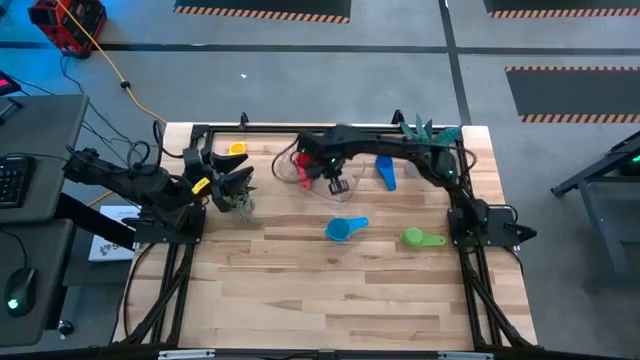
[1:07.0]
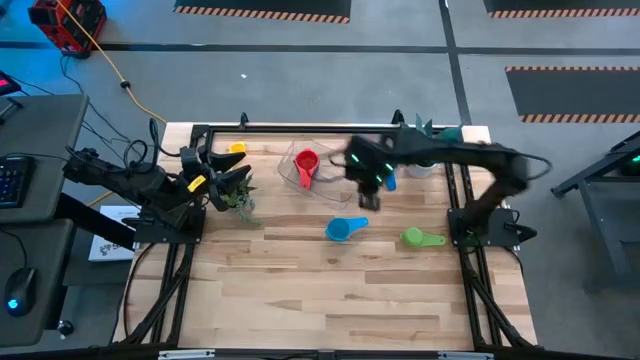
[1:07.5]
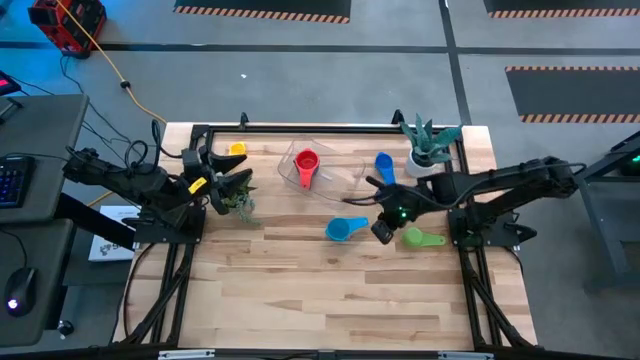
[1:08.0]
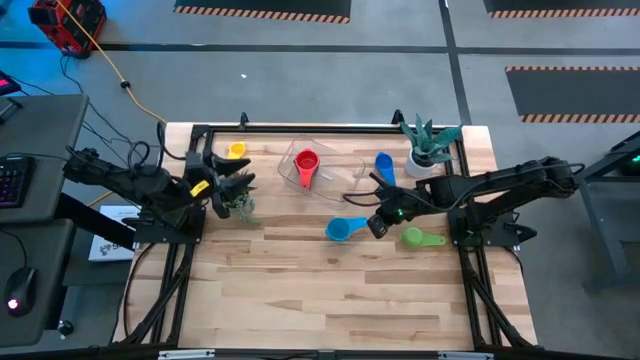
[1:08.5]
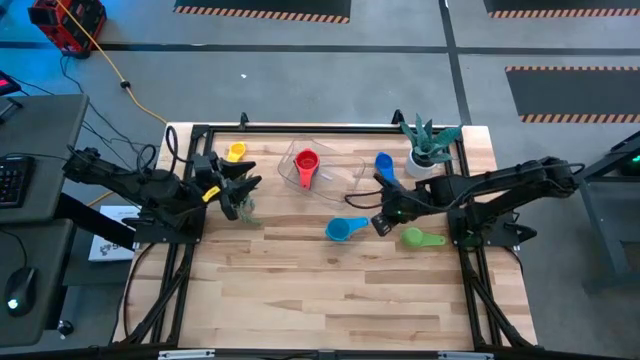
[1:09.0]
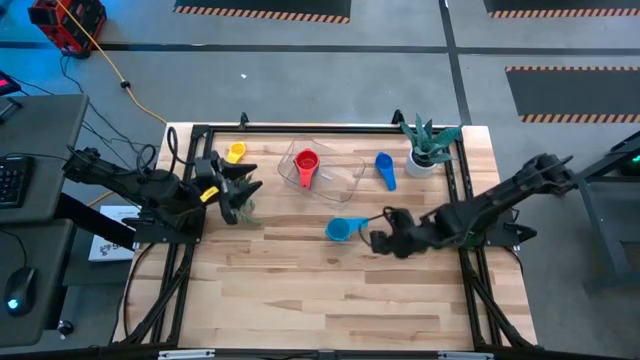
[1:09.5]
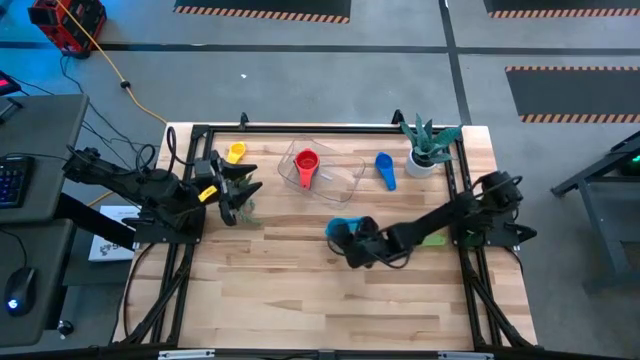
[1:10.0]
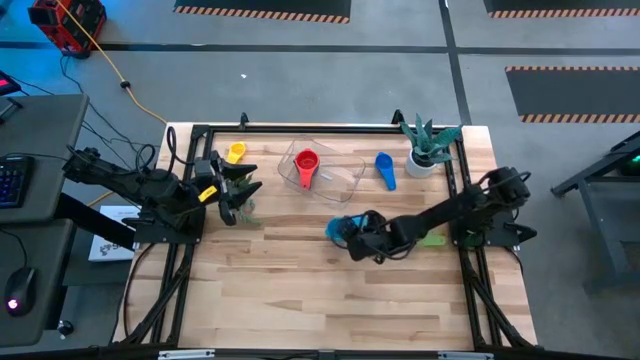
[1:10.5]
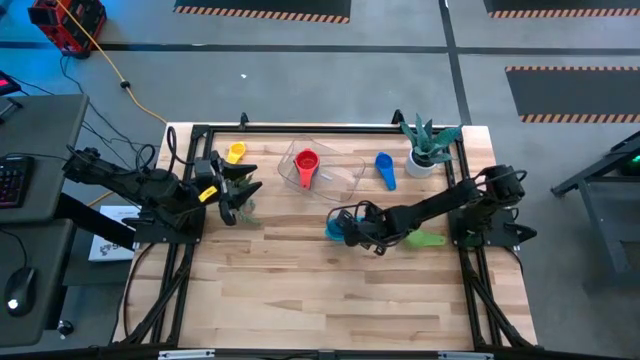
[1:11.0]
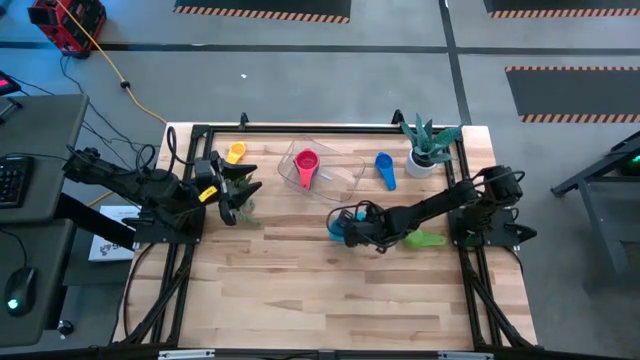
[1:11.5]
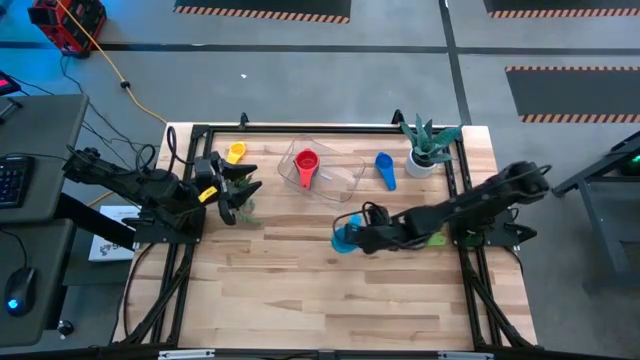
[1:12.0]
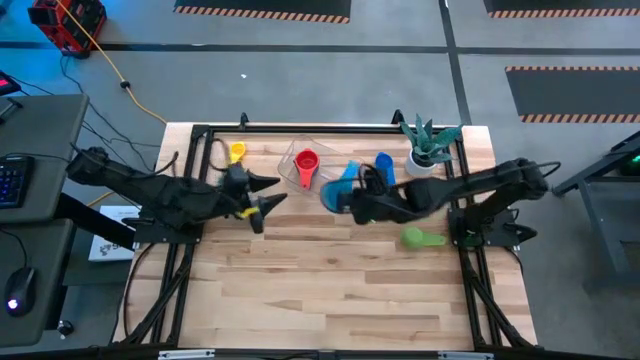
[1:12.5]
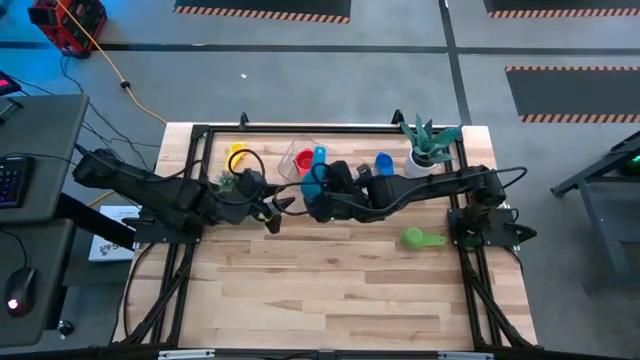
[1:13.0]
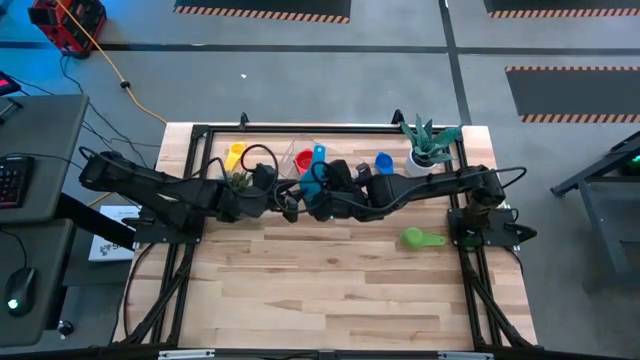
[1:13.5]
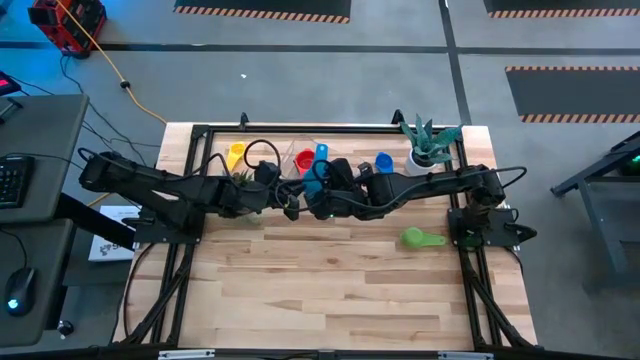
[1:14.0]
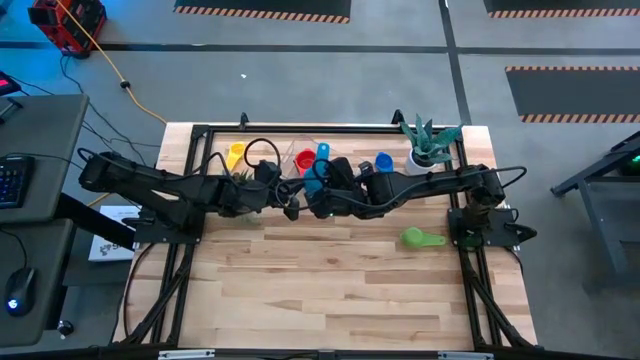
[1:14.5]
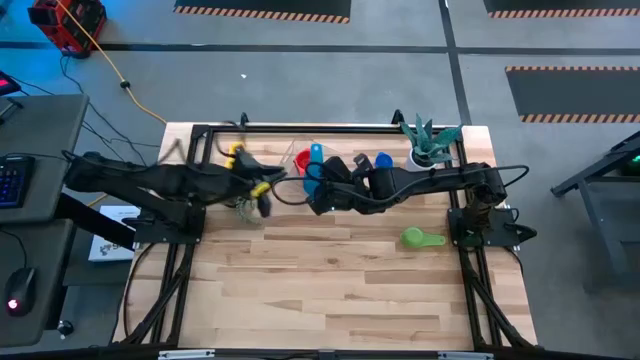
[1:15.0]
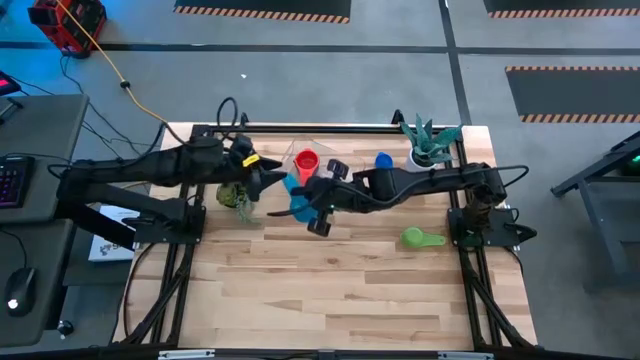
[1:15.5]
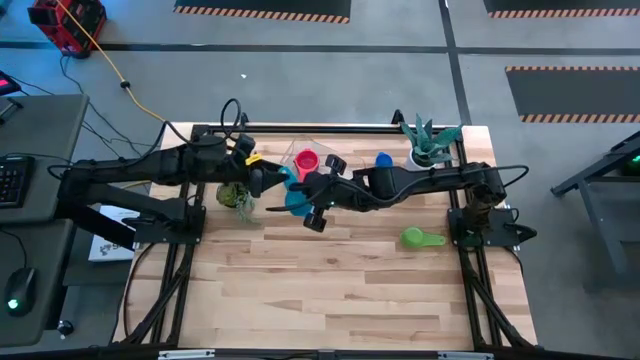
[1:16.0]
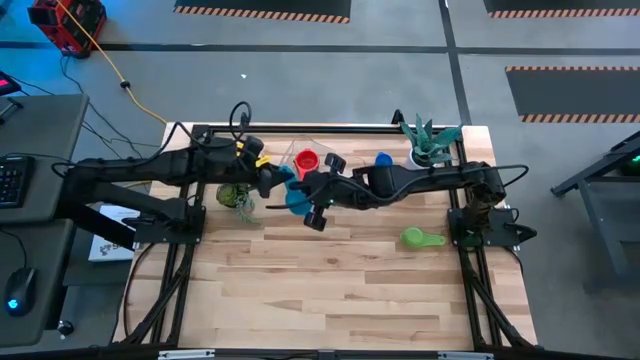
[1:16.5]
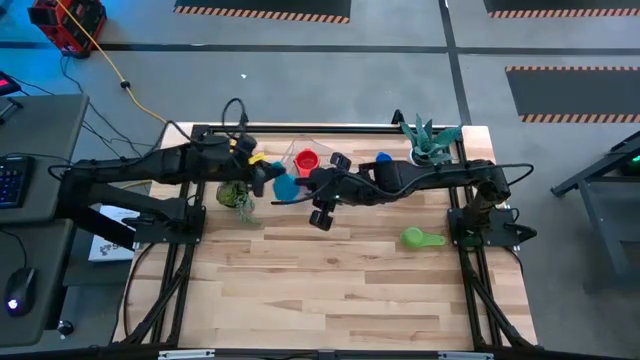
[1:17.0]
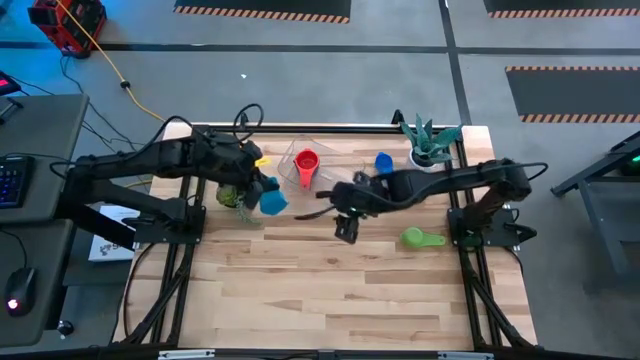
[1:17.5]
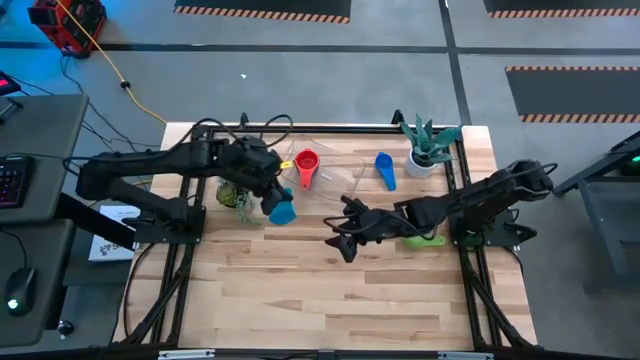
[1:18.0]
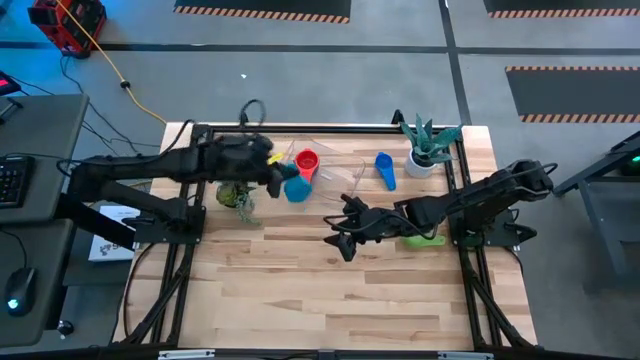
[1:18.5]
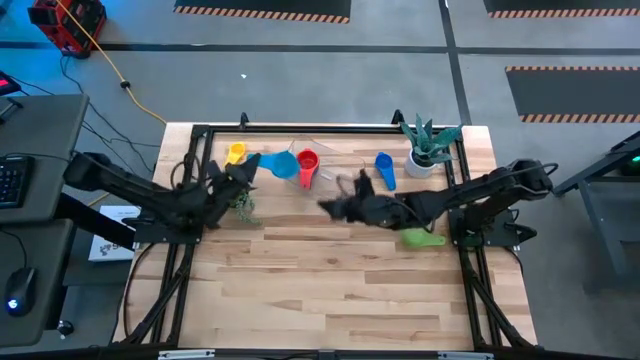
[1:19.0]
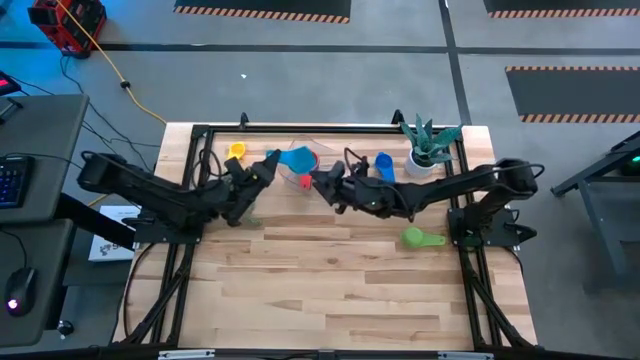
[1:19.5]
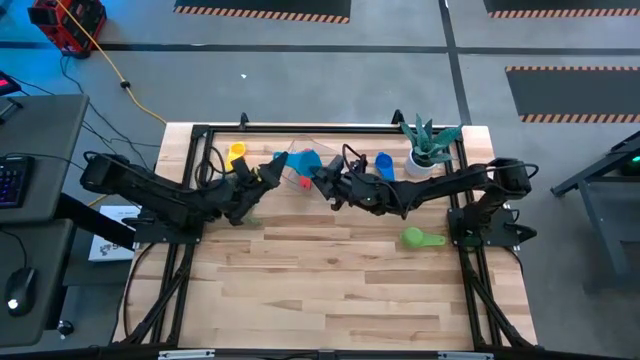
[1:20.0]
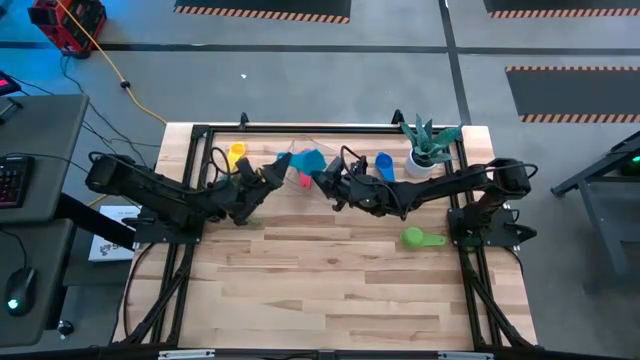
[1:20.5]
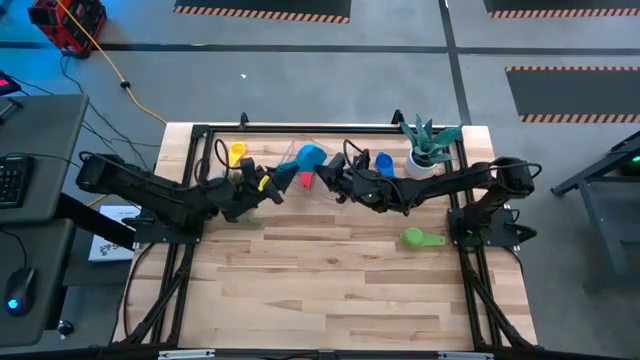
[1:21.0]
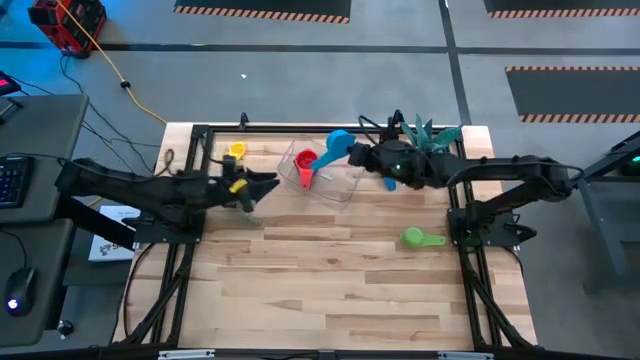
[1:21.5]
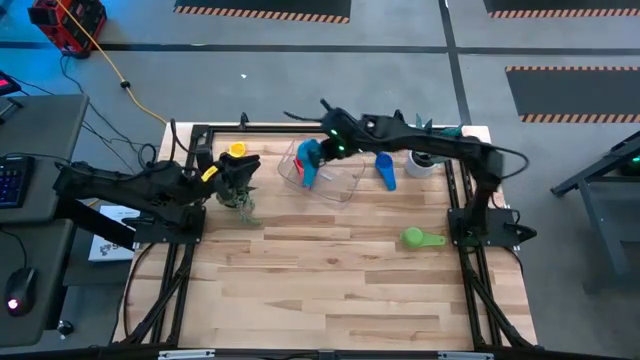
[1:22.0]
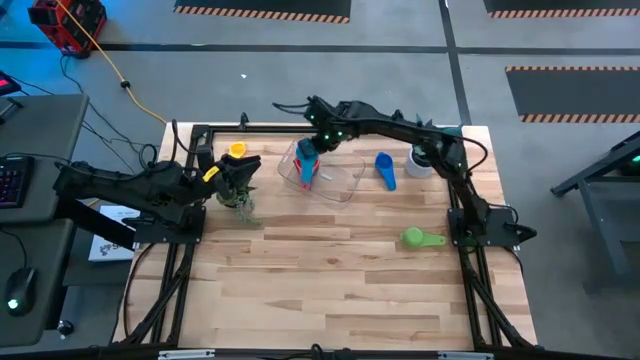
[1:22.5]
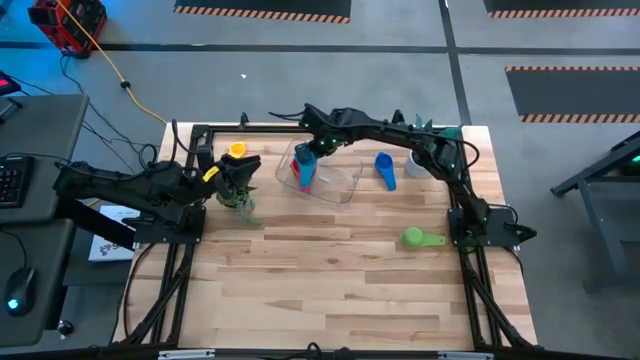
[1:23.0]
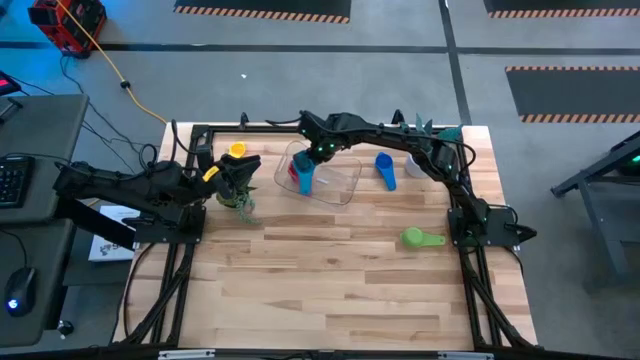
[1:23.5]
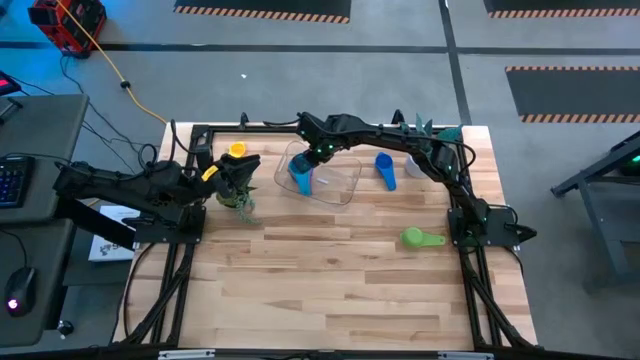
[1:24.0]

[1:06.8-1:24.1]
Task: Nest measuring cups in basket
Stack the light blue measuring cup on top of the red measuring cup on the transparent bin

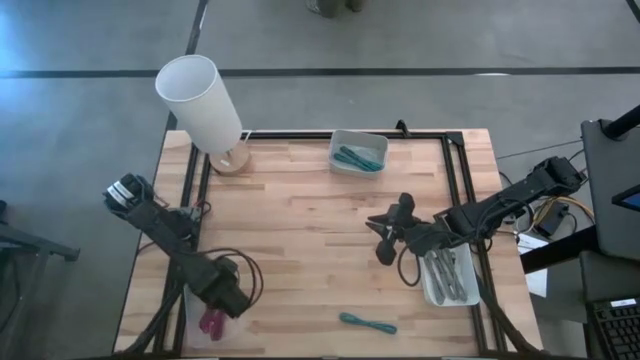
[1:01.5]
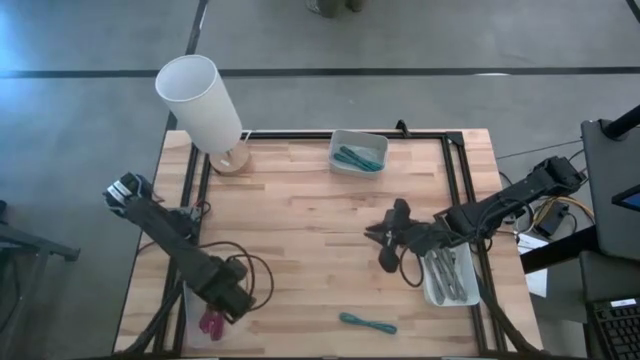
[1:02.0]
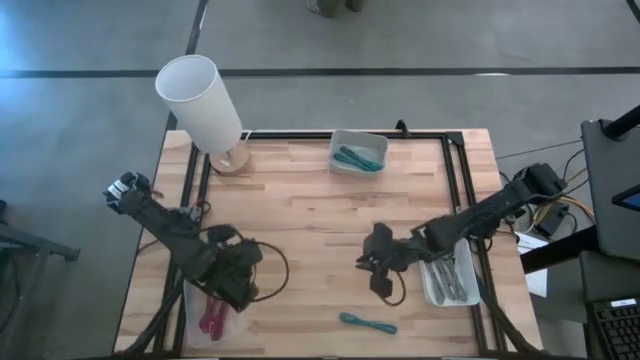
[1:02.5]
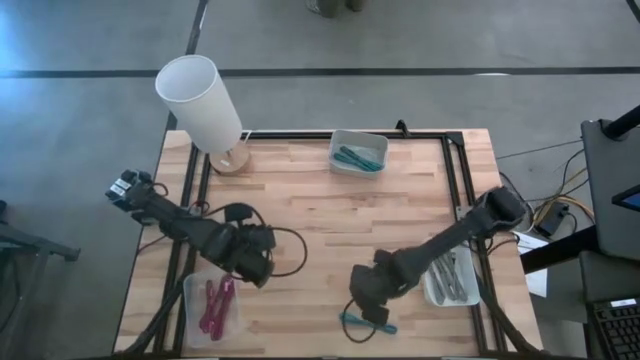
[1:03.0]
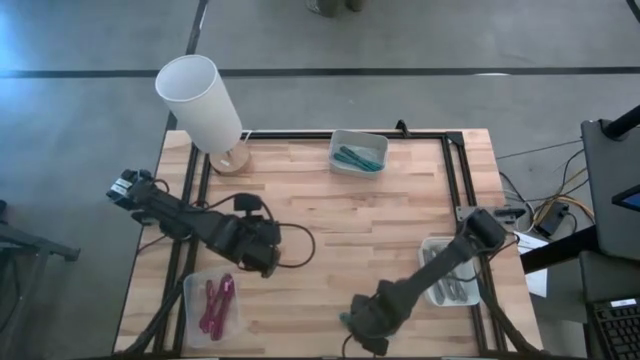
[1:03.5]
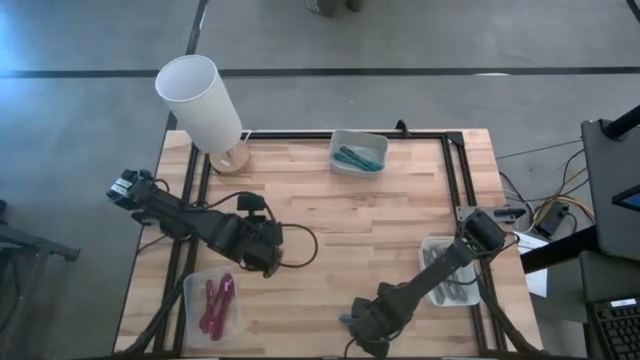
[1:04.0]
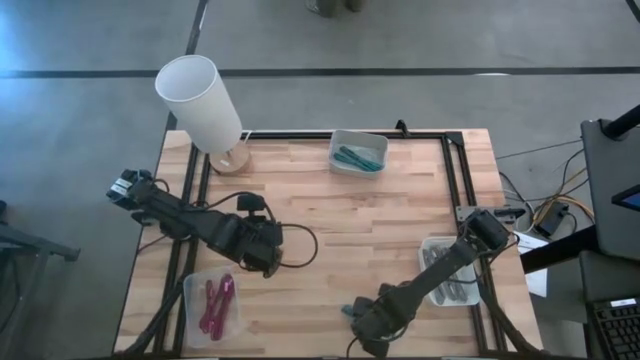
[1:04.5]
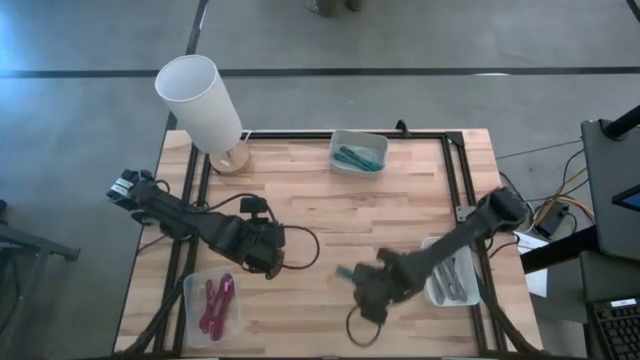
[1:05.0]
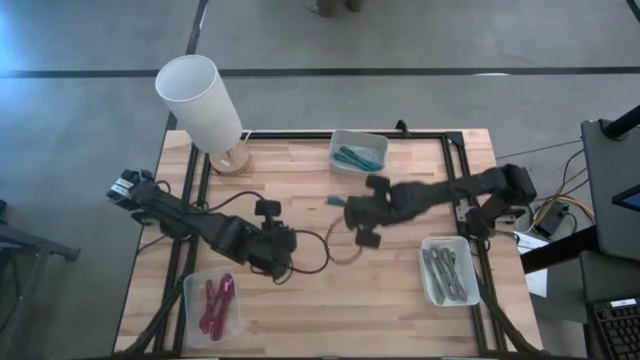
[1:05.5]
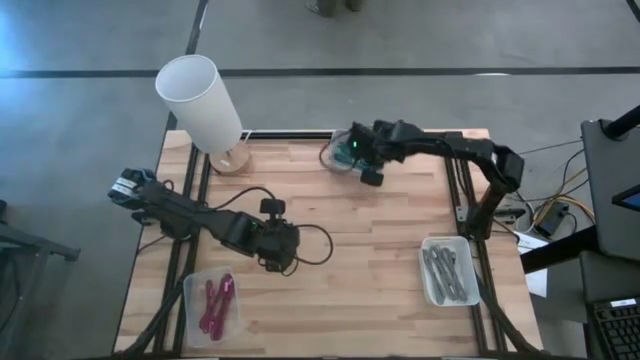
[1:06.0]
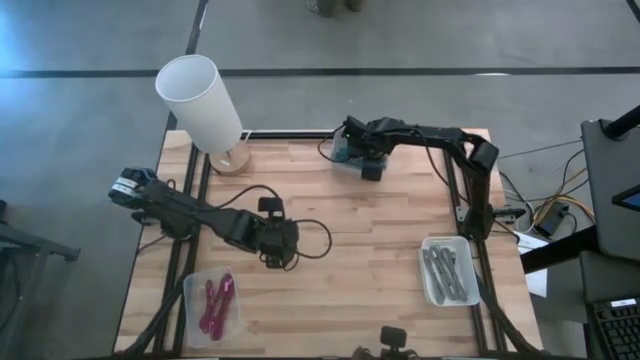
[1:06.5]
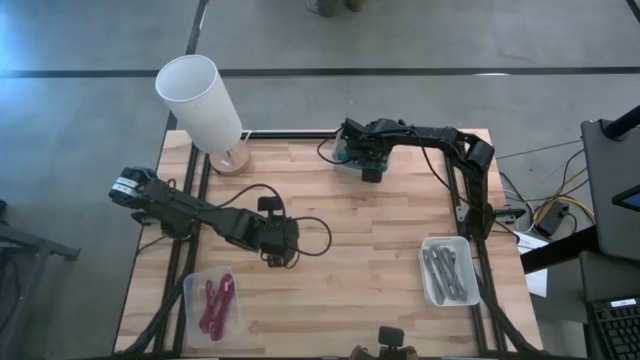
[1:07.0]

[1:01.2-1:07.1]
Task: Pick & Place USB Port
Put the blue striped charger cable into the gray bin
